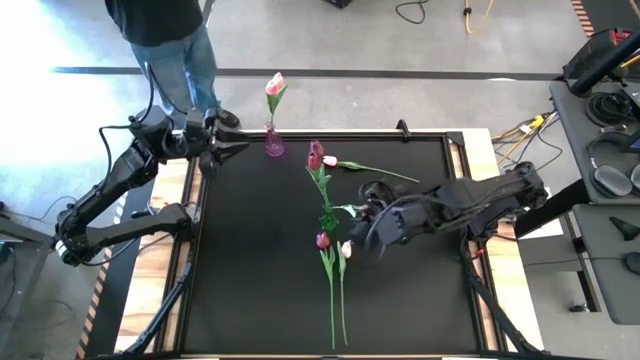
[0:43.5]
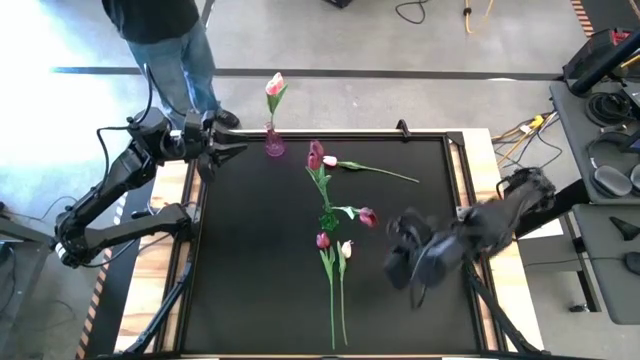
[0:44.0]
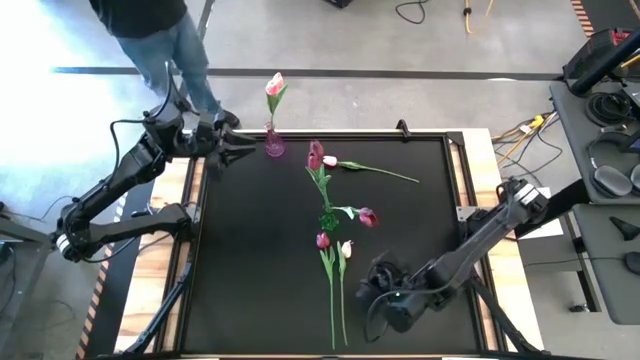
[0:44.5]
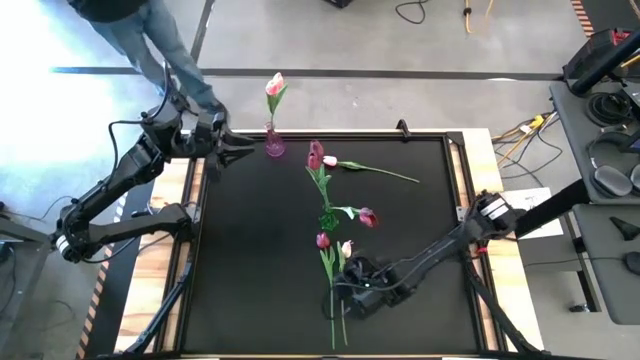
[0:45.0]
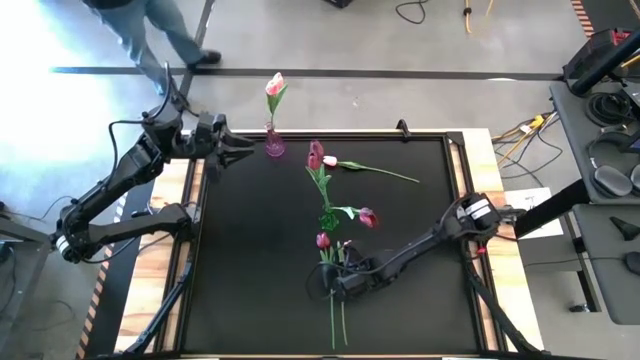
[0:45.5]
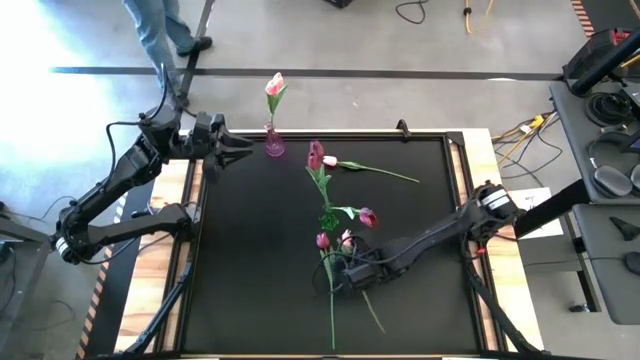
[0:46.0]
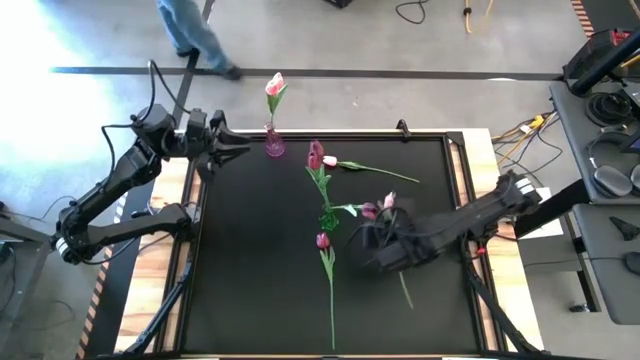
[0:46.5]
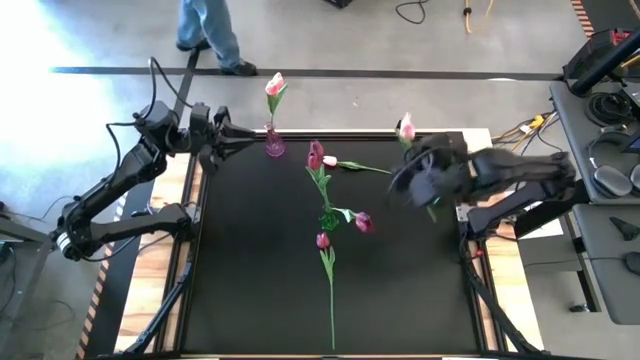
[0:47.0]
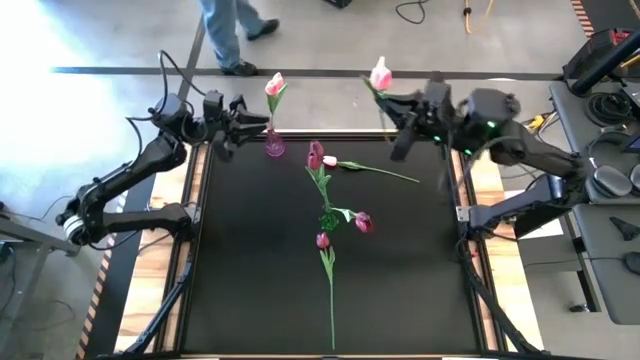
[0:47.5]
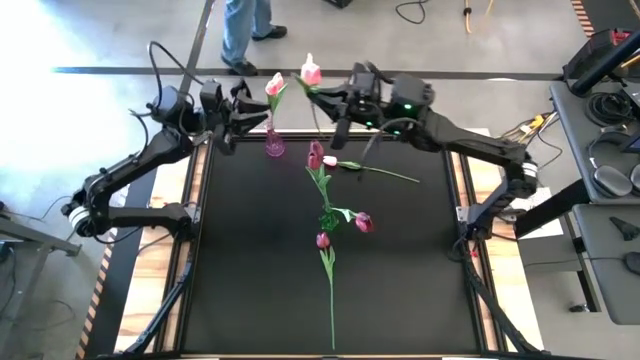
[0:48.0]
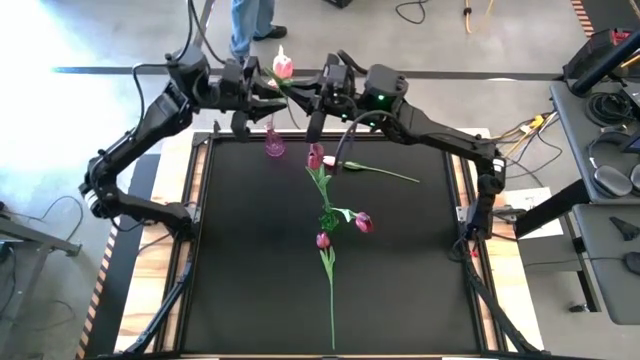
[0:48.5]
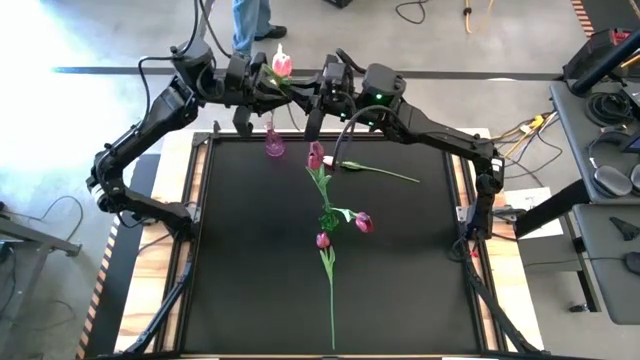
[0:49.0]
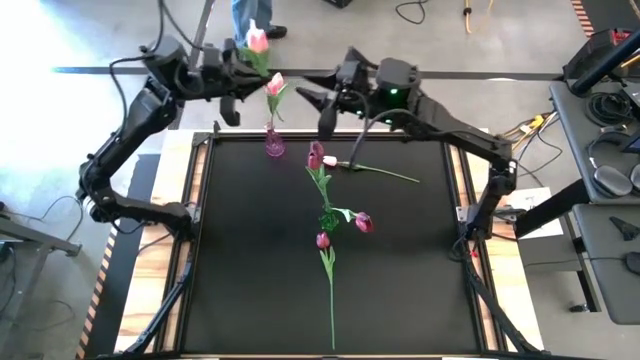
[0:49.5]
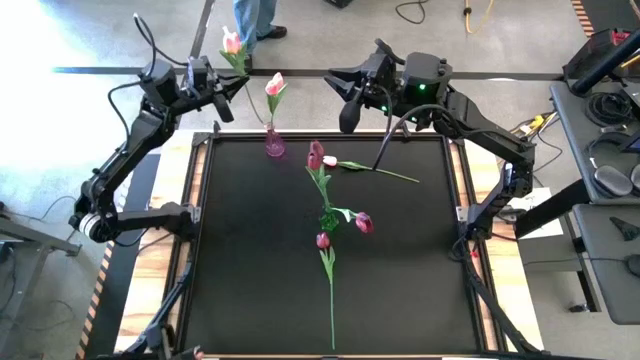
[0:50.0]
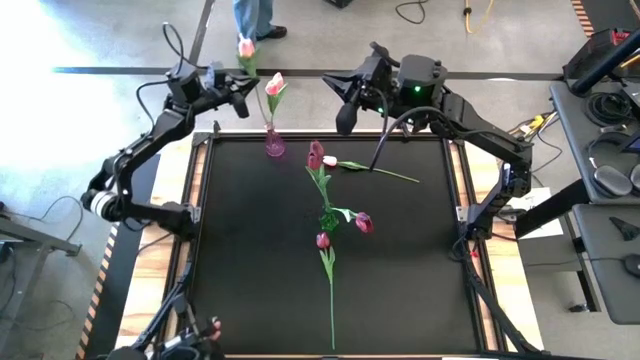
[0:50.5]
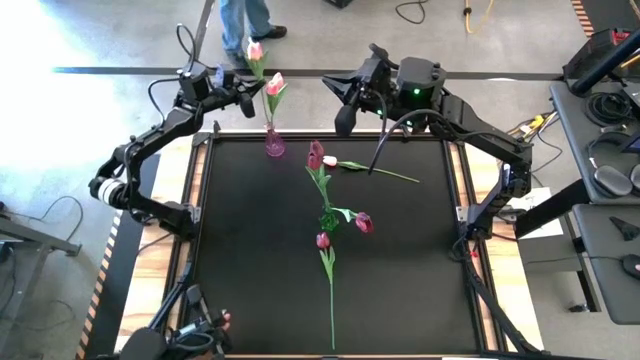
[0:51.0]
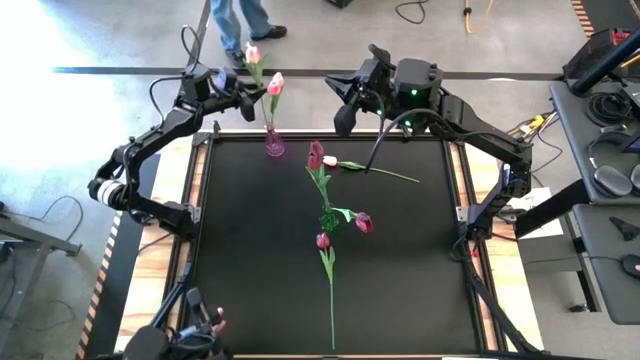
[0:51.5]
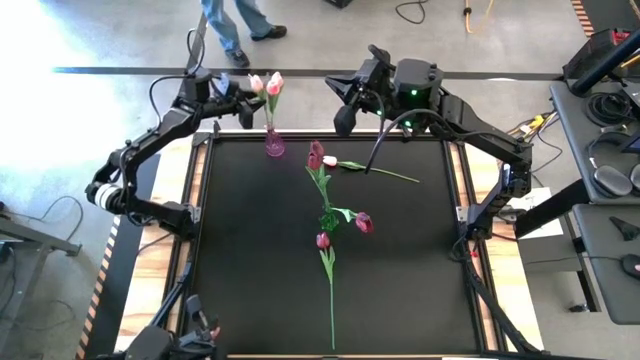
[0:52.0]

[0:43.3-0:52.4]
Task: Sort flowers into vase by color
Put the pink flower into the violet vase

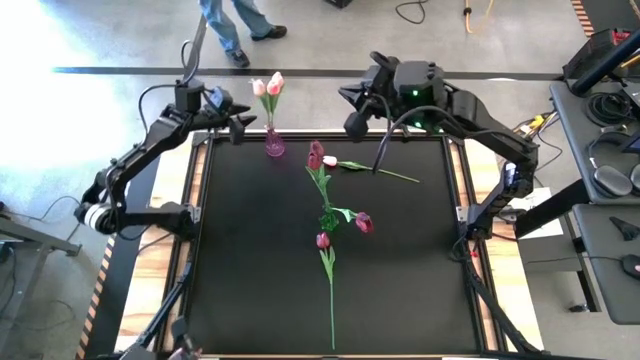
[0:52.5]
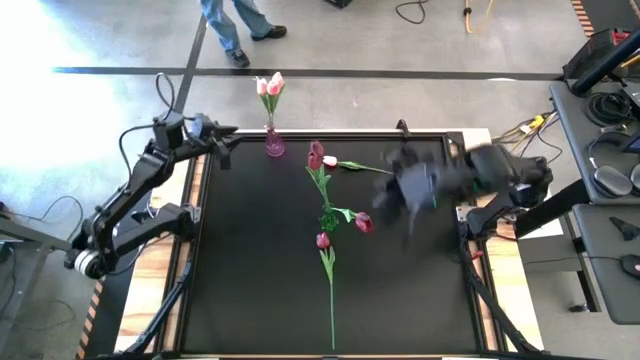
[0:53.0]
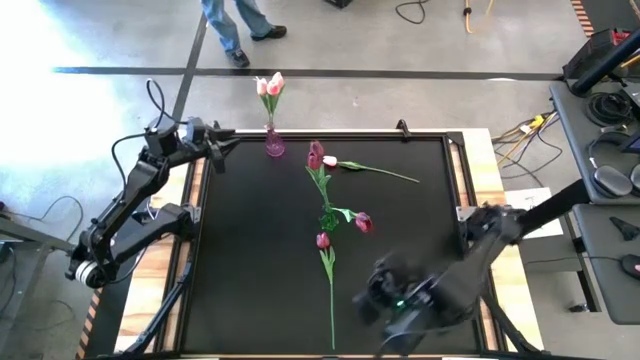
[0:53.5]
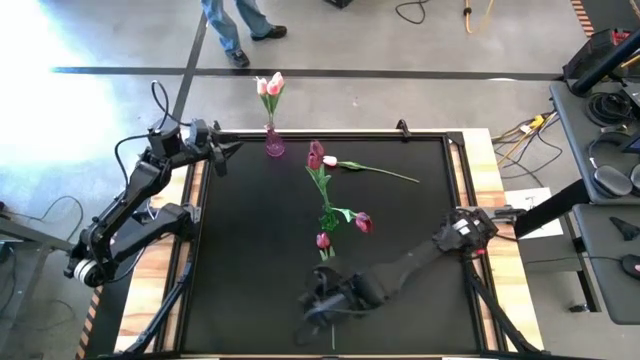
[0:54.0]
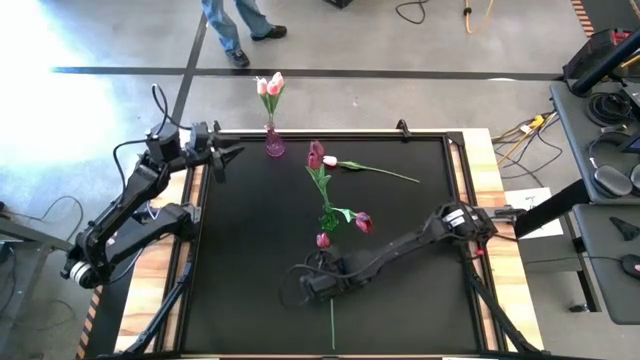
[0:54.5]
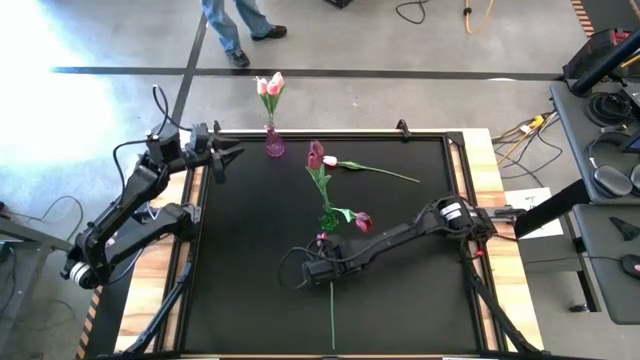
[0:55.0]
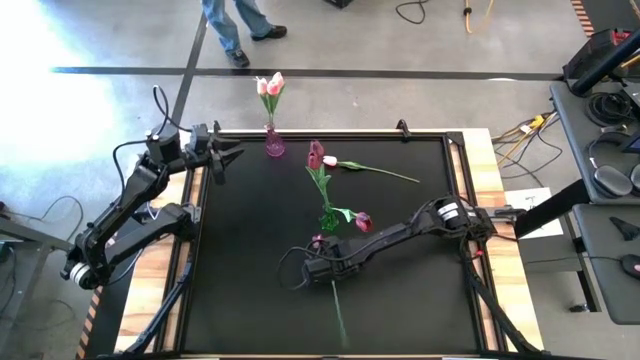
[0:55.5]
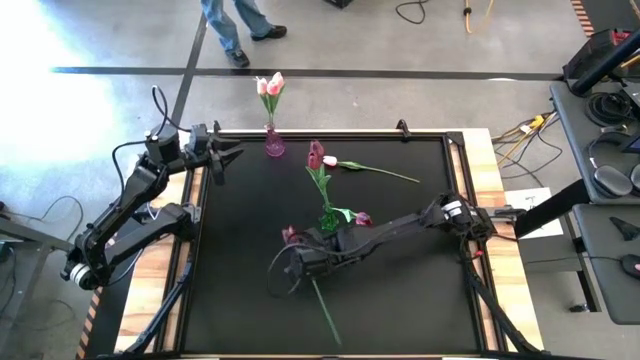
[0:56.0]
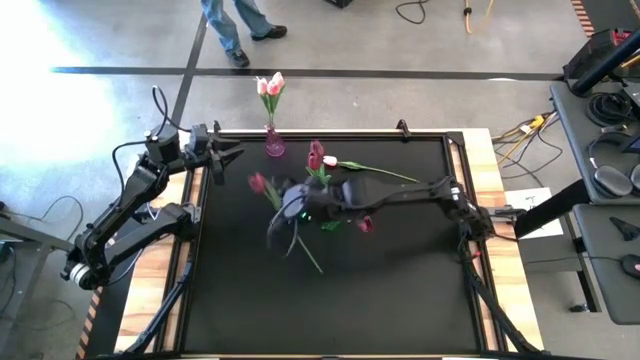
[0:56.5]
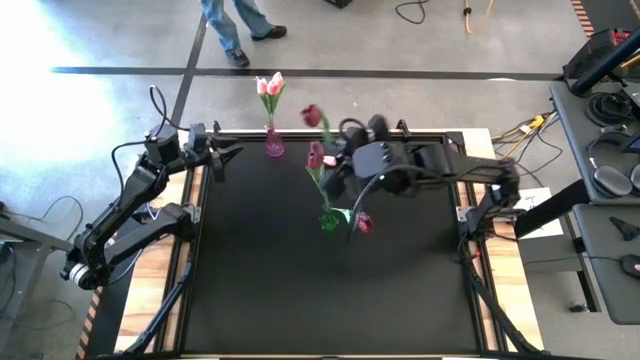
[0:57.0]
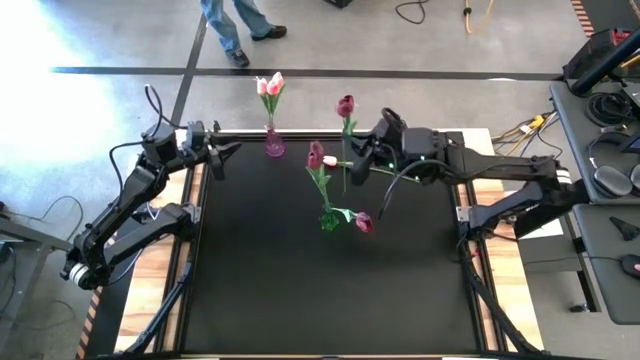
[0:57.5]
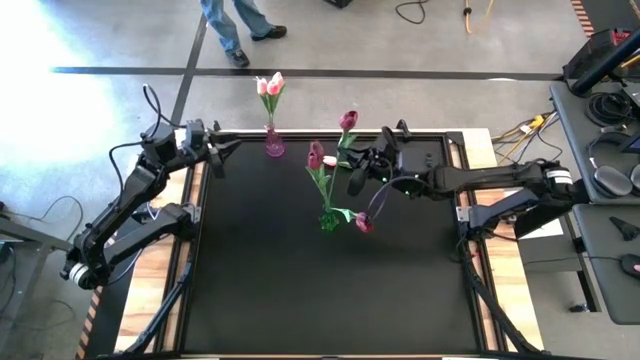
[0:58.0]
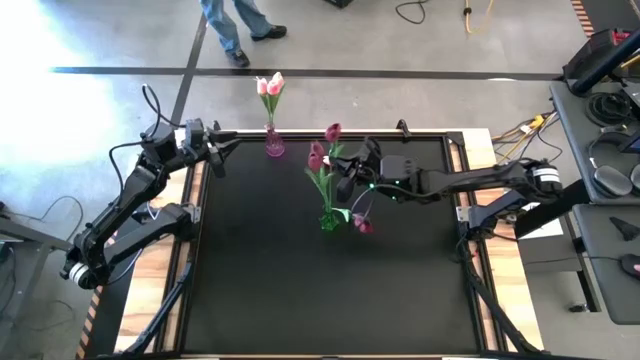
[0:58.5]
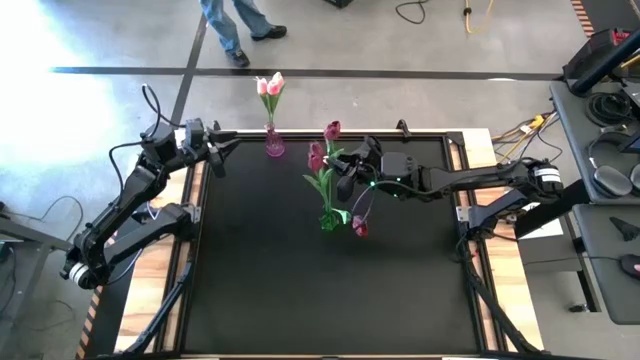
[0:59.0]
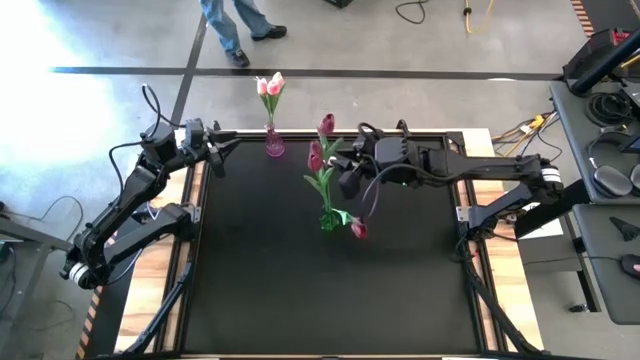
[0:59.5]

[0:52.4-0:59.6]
Put the red flower into the green vase

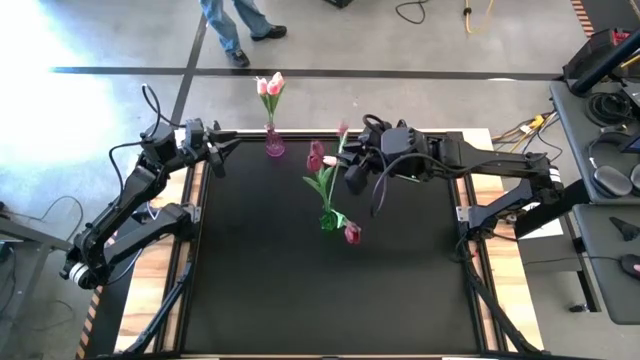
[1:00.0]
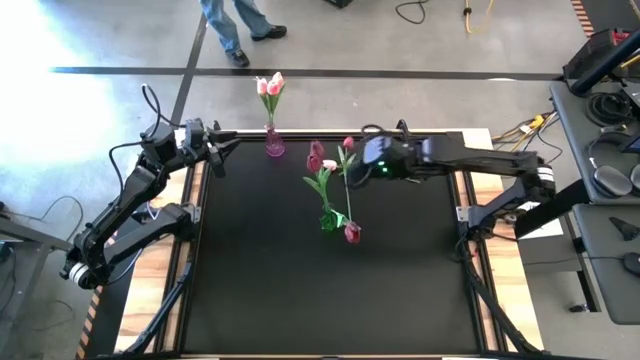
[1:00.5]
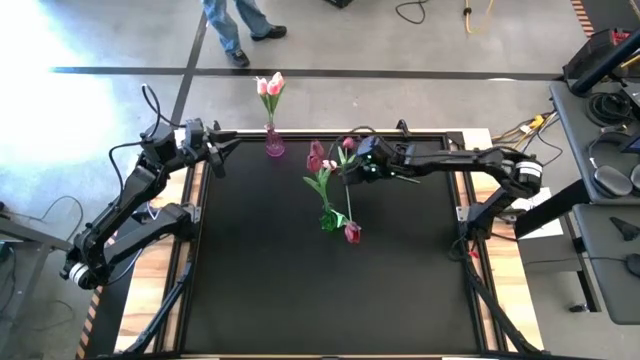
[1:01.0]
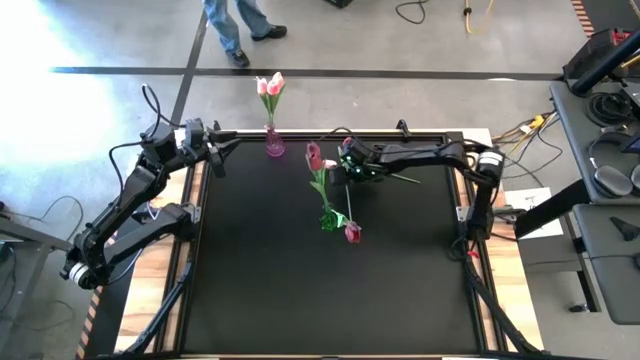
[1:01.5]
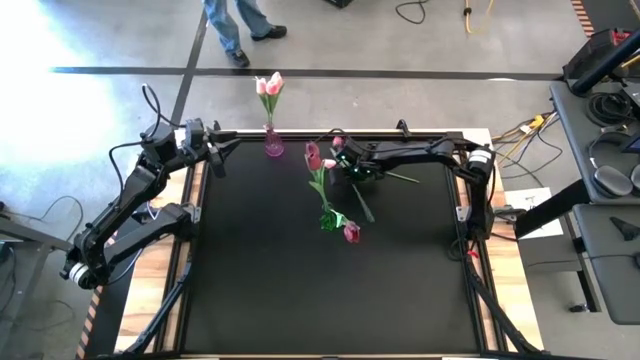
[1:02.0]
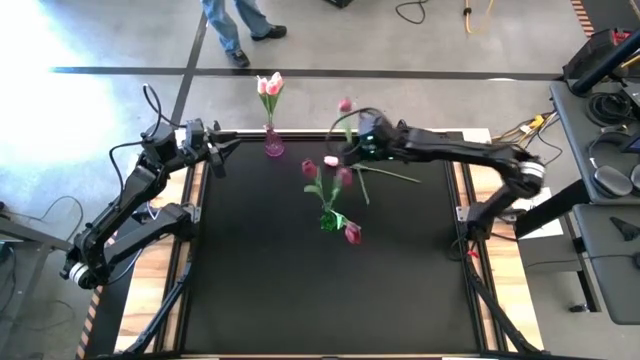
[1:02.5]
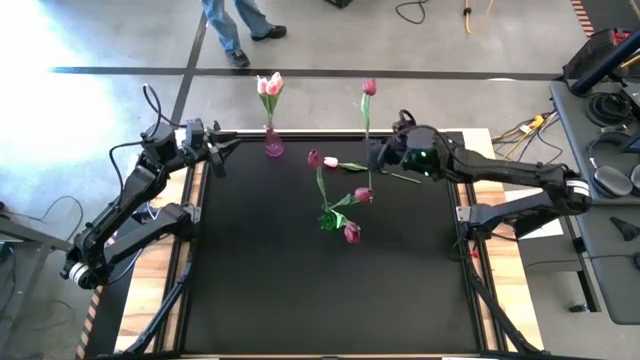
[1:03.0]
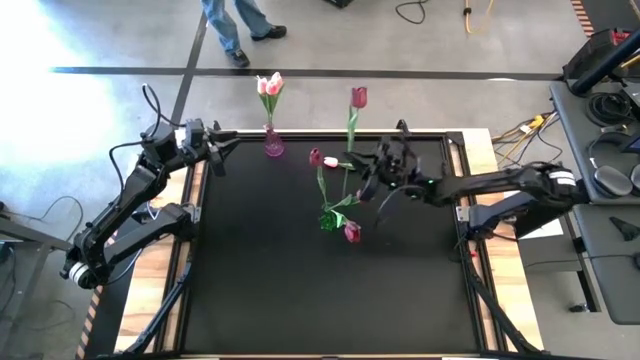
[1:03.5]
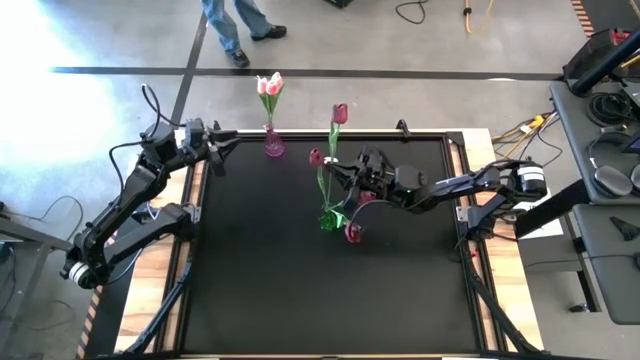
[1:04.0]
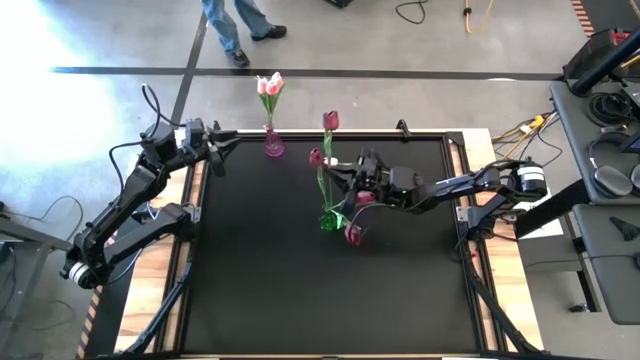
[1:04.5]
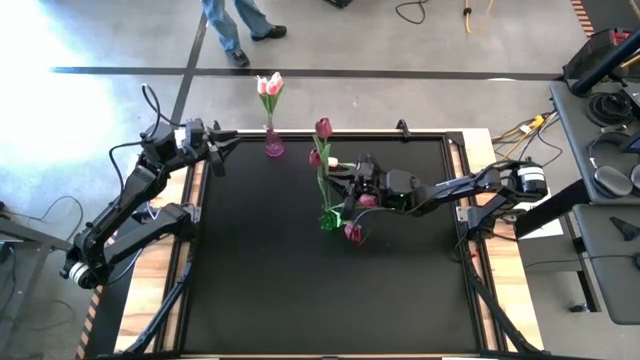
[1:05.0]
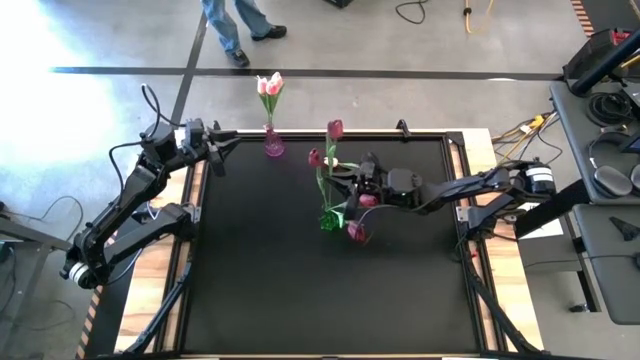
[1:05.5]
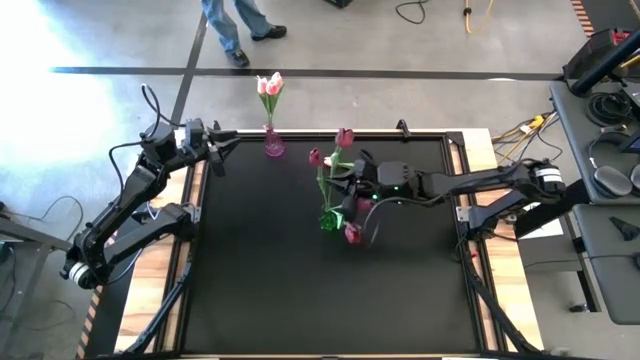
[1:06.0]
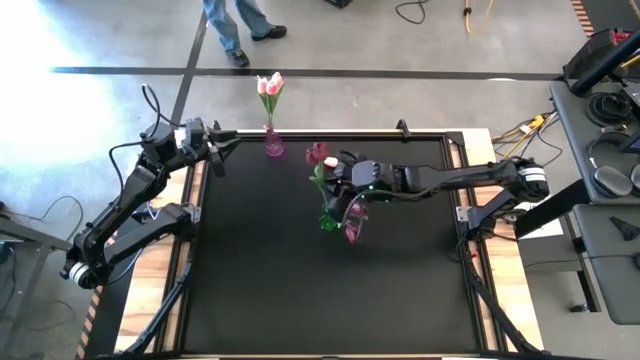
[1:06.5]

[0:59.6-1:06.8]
Put the red flower into the green vase
